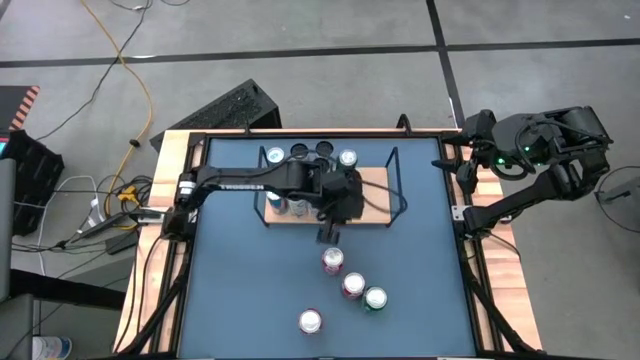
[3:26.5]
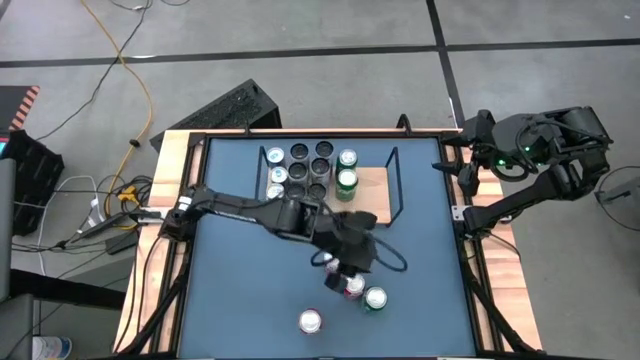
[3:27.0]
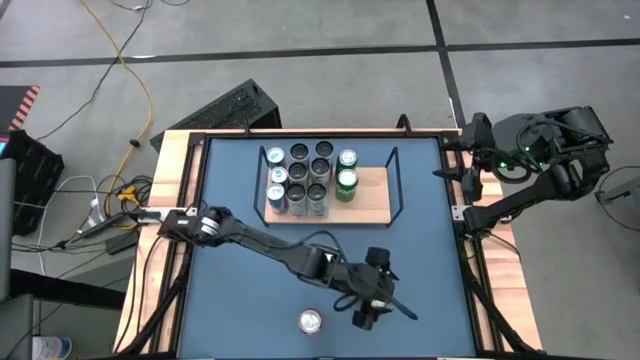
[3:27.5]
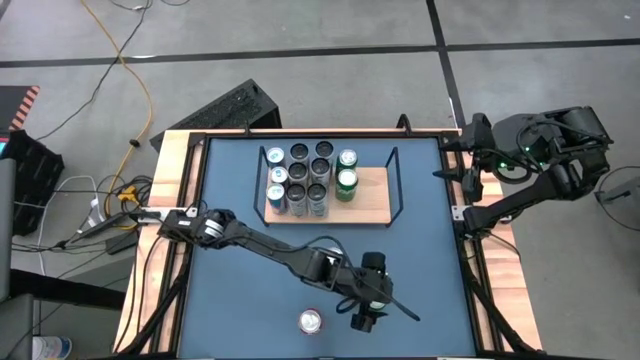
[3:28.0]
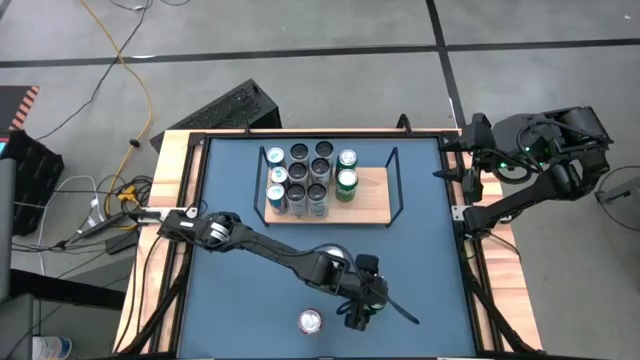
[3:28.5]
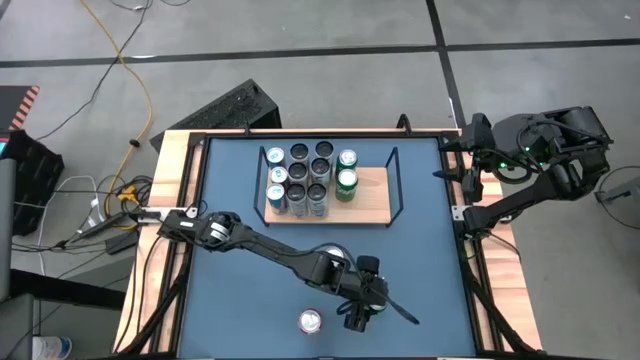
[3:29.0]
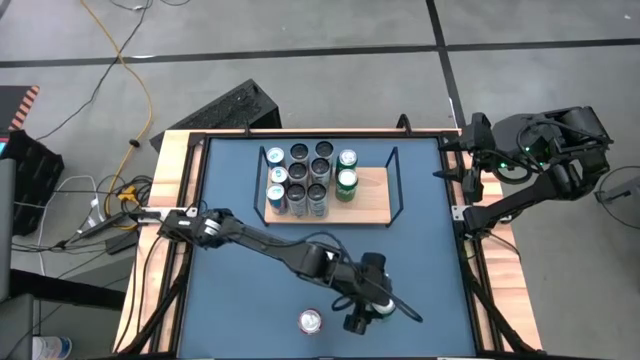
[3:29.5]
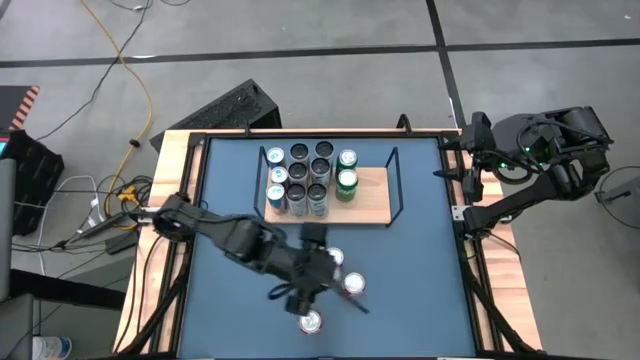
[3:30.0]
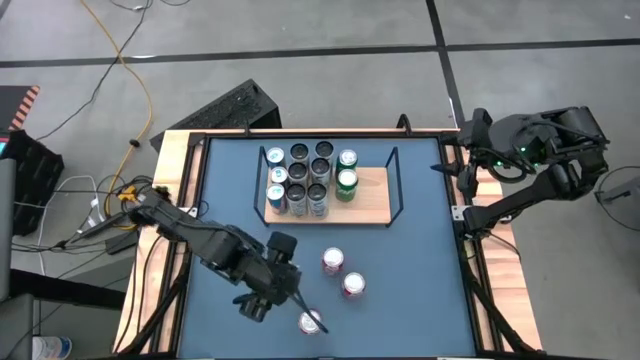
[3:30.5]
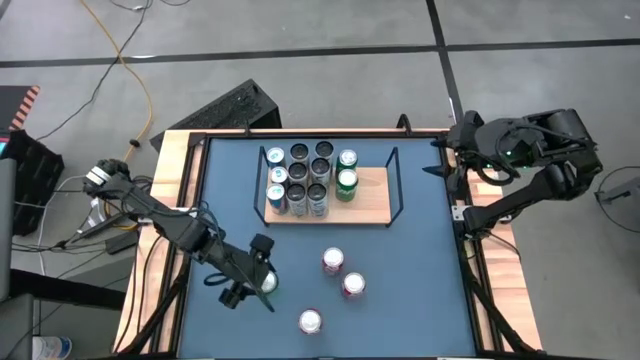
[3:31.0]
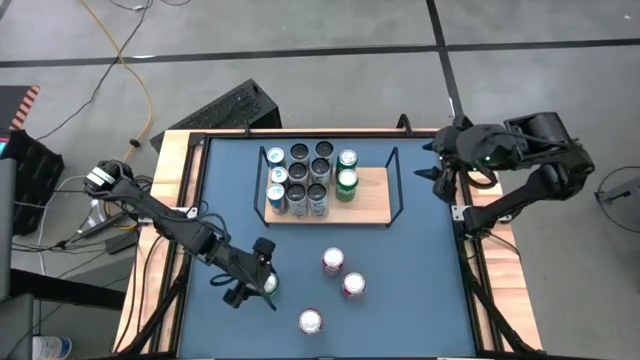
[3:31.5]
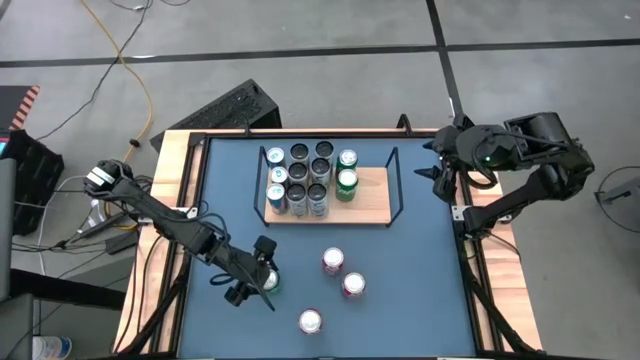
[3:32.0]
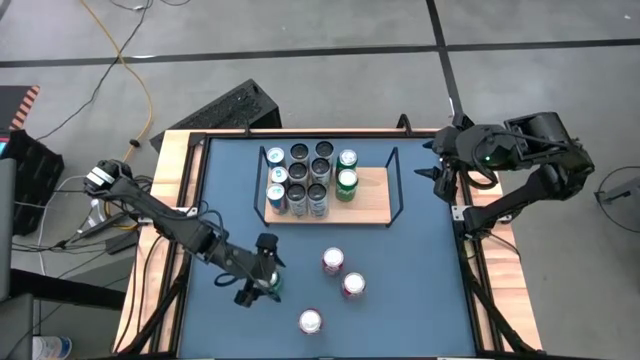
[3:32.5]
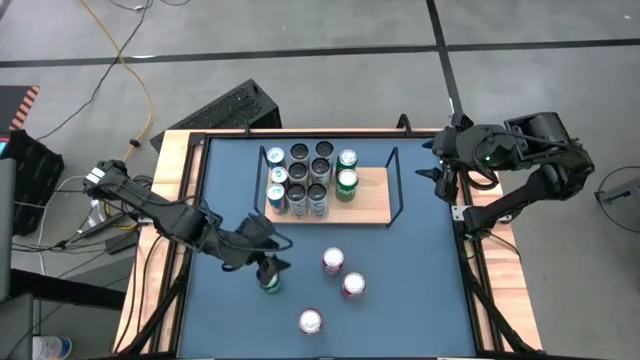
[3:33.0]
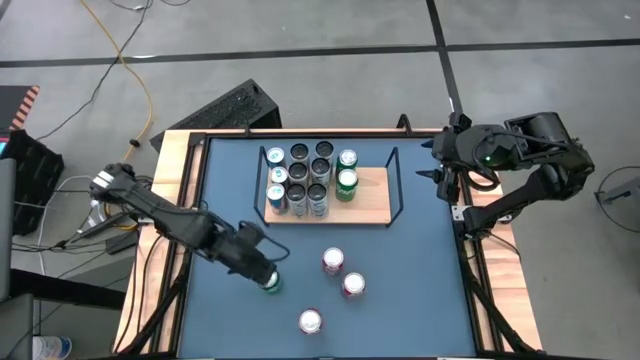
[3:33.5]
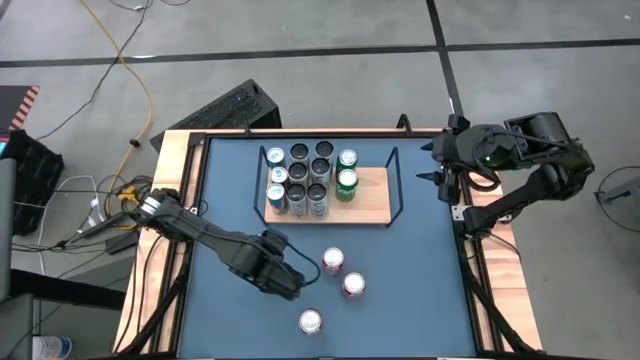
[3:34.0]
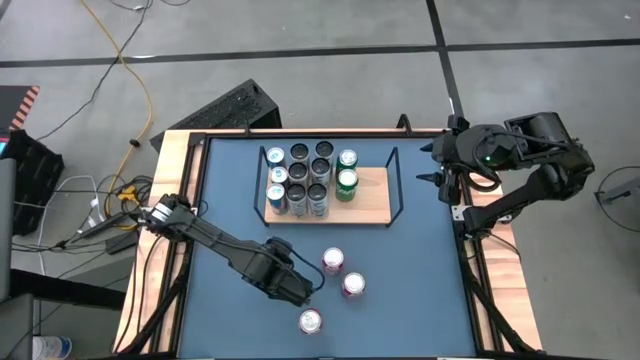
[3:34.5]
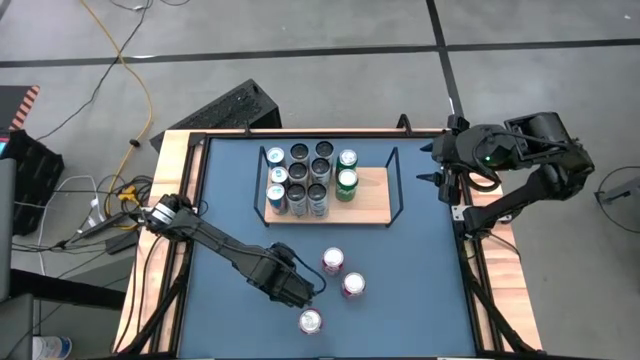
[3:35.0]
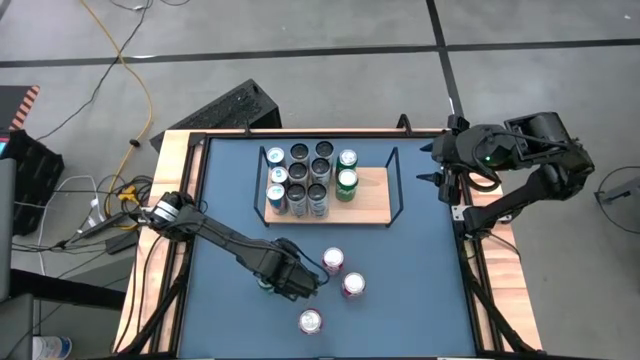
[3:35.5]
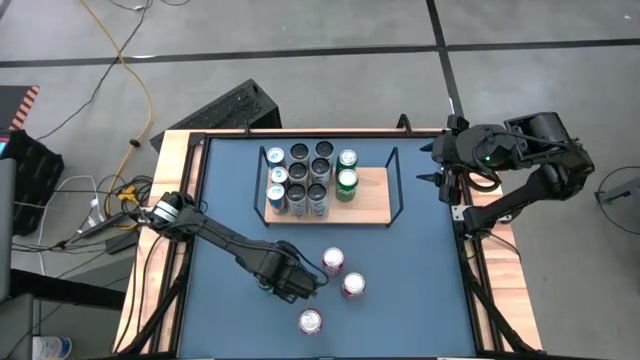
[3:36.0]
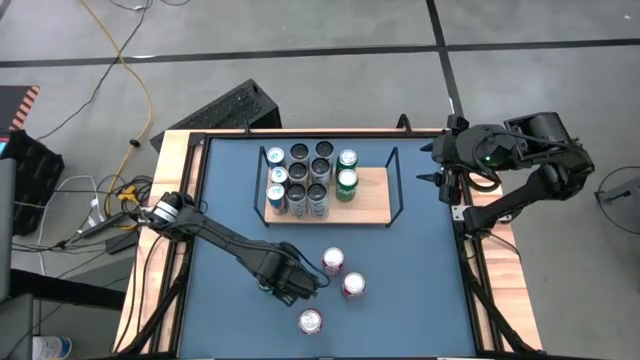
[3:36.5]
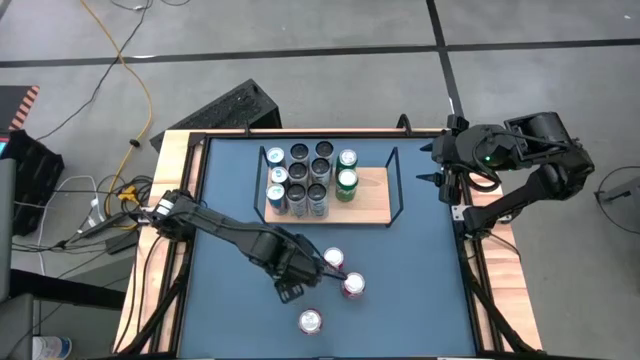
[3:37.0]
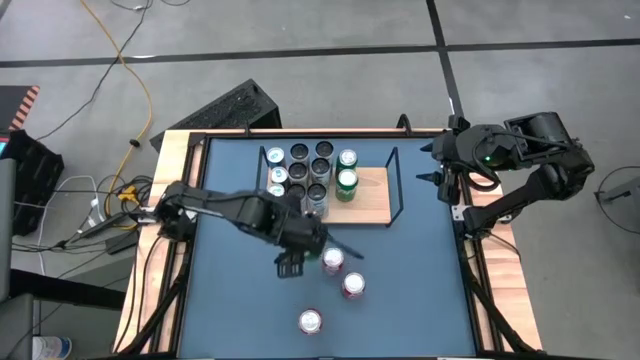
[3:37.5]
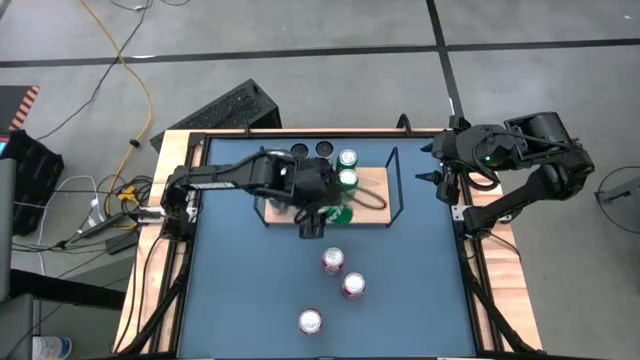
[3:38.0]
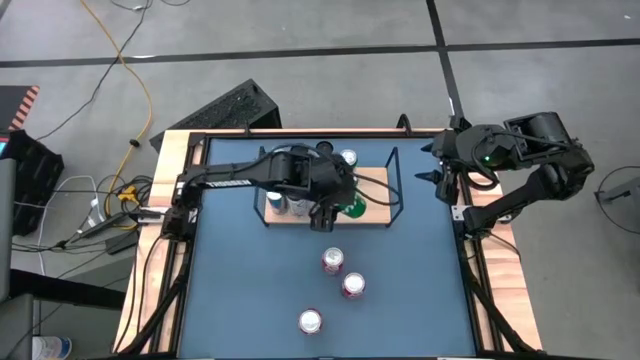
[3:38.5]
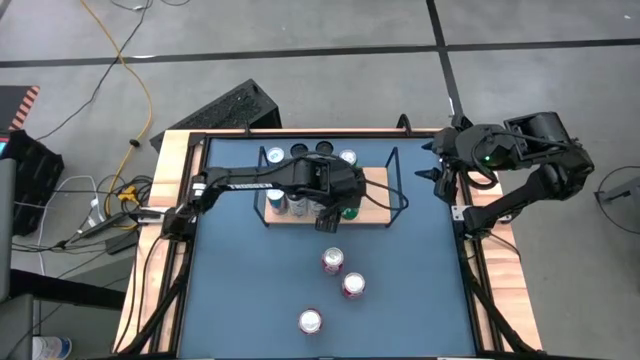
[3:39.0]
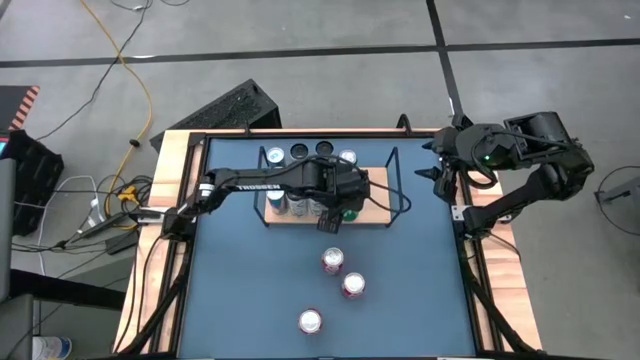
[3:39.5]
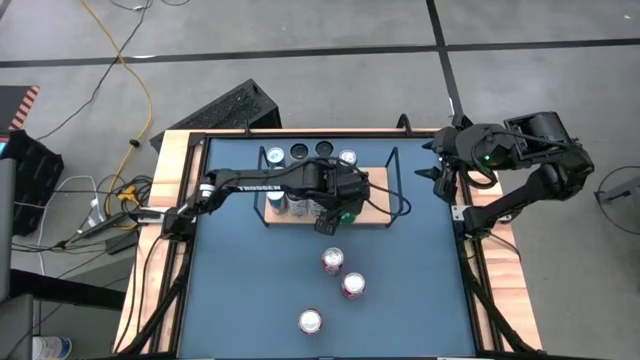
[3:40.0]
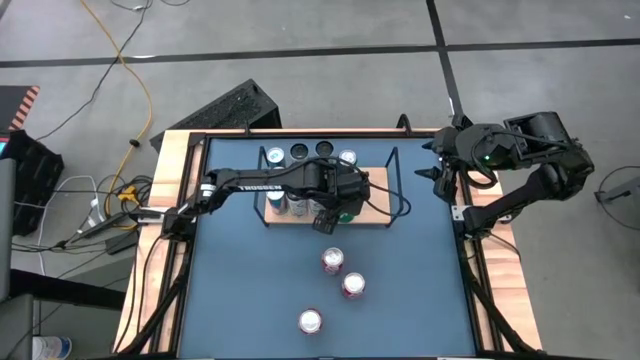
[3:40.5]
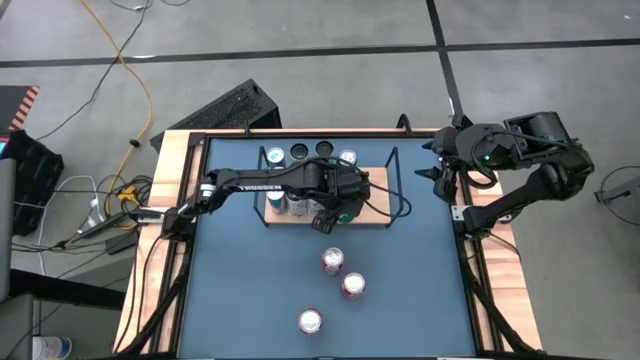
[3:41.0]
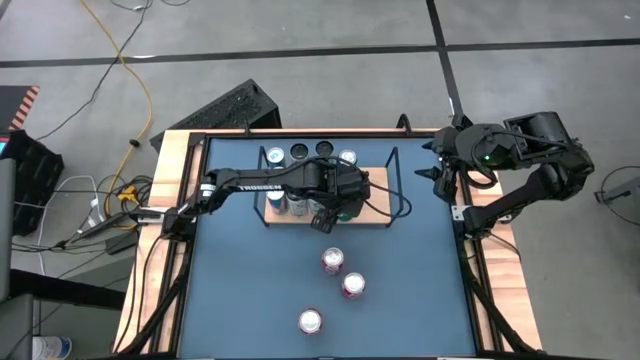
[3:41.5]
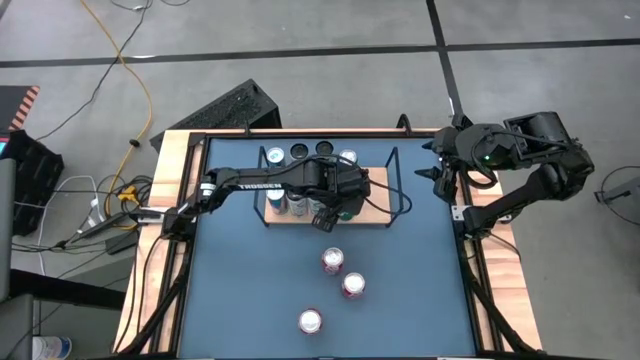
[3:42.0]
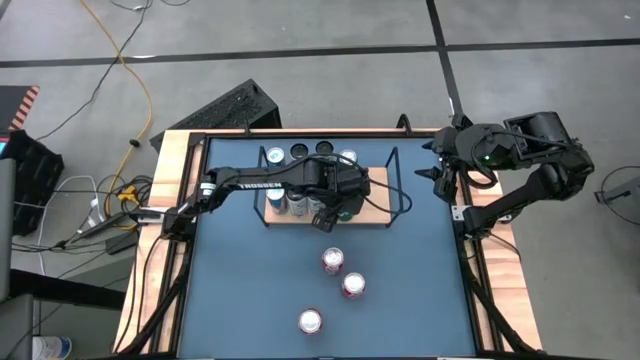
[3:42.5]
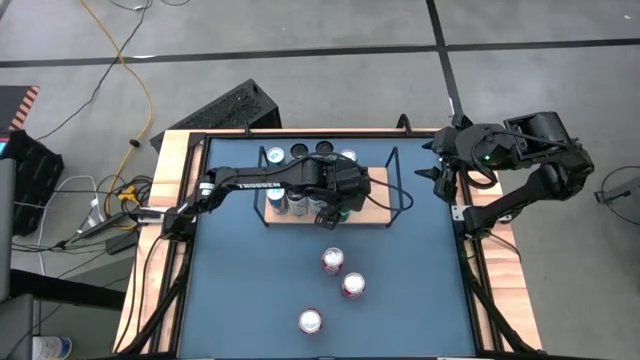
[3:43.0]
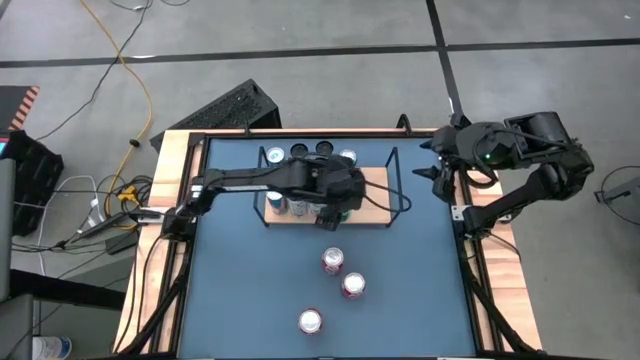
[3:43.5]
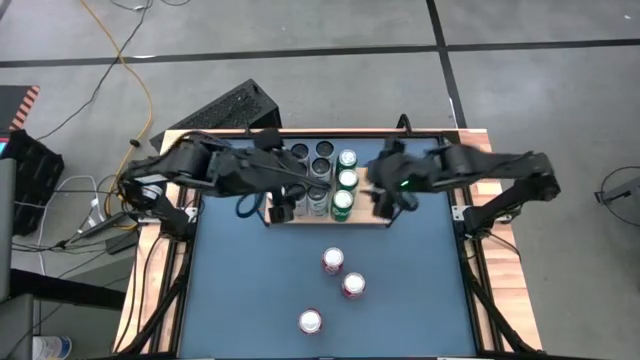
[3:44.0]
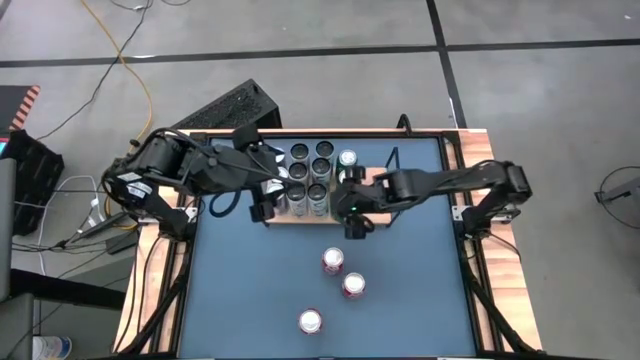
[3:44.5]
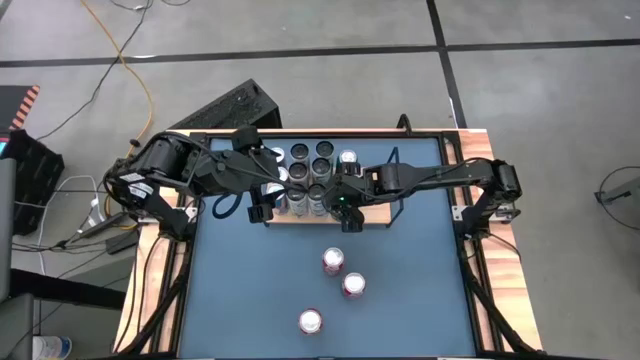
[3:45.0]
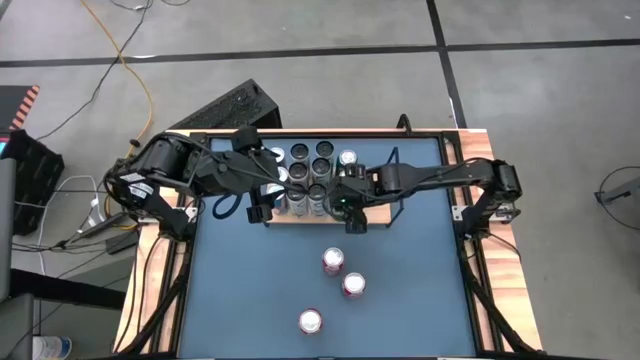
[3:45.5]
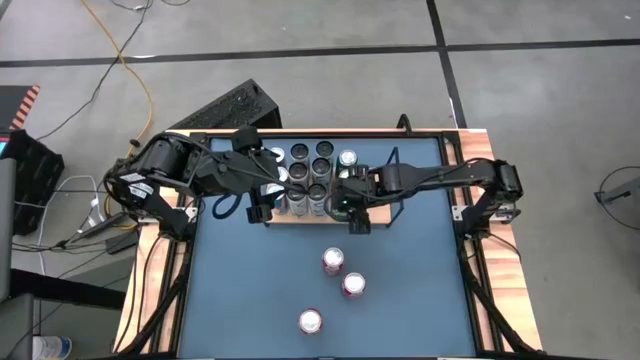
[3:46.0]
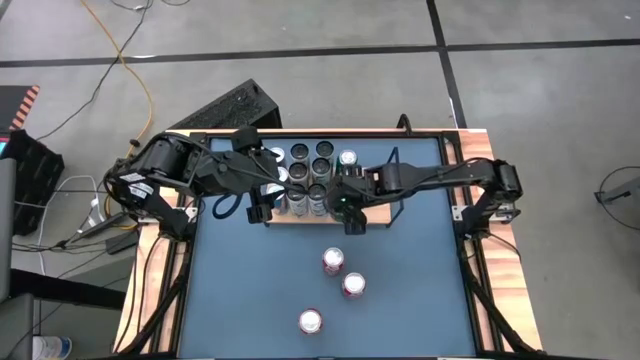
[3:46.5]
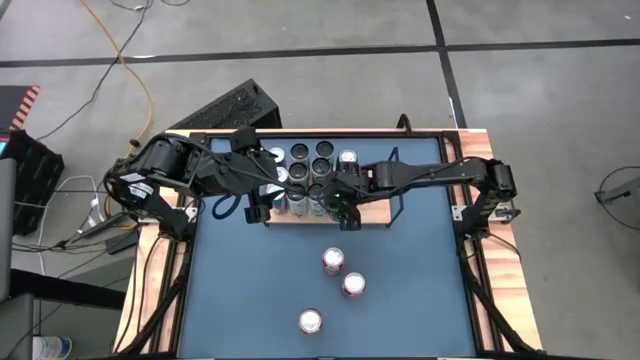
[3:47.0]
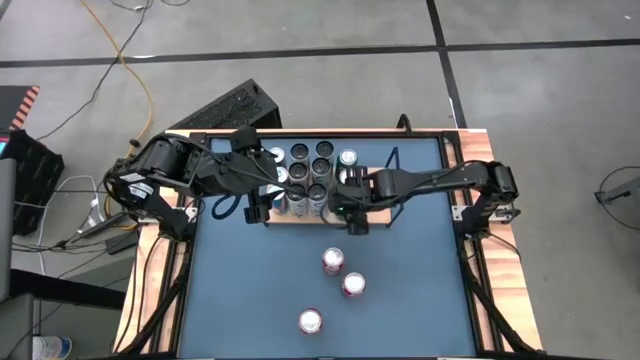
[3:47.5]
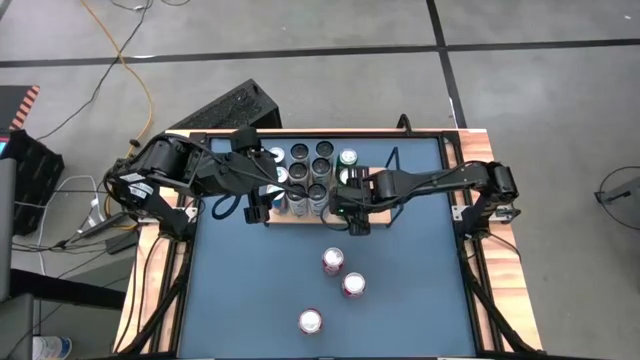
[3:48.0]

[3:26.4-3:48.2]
Task: Place canned beverage on shelf
Put the green soda can on the shelf aligned with the other green soda cans
